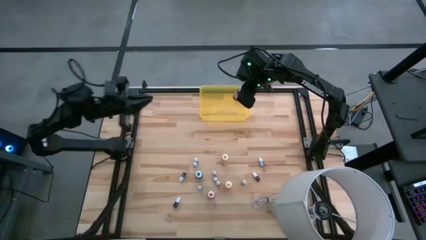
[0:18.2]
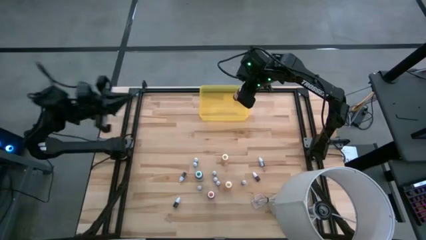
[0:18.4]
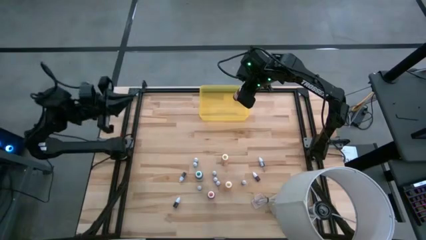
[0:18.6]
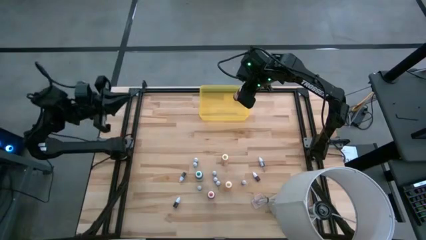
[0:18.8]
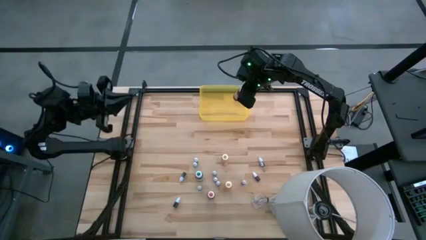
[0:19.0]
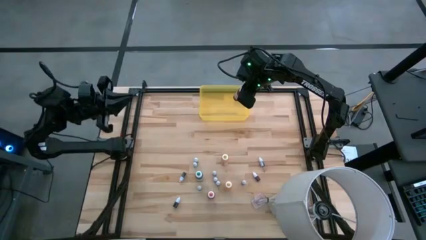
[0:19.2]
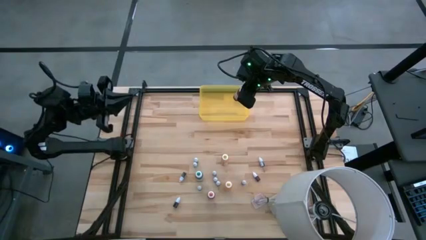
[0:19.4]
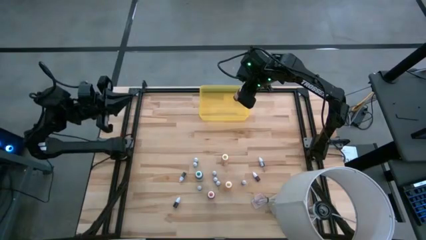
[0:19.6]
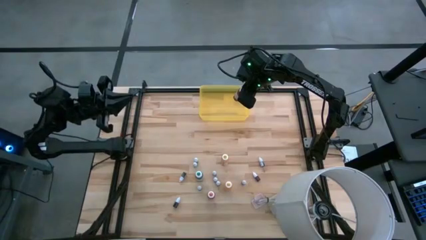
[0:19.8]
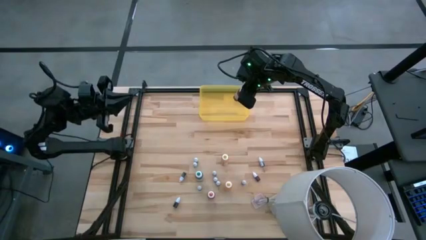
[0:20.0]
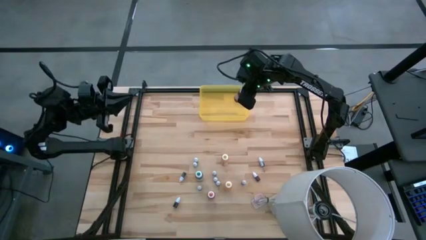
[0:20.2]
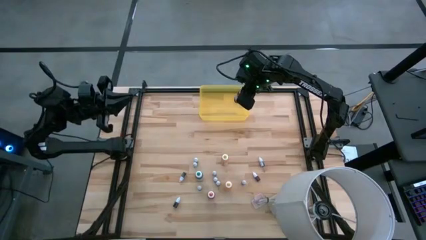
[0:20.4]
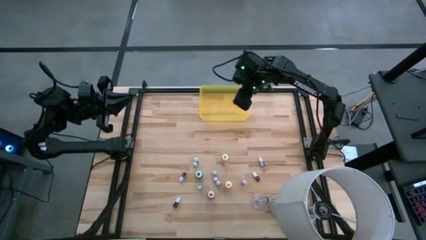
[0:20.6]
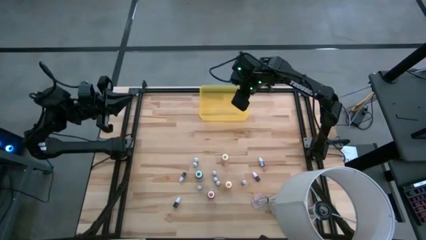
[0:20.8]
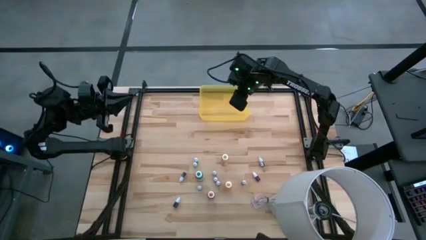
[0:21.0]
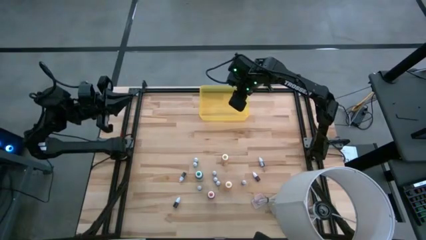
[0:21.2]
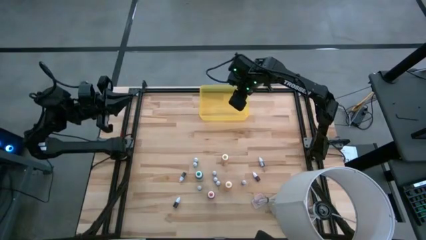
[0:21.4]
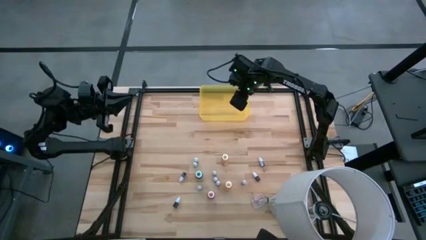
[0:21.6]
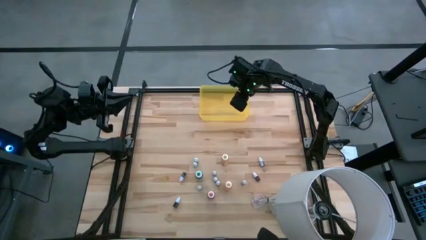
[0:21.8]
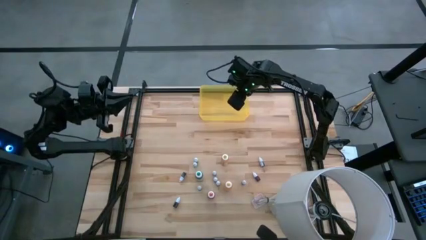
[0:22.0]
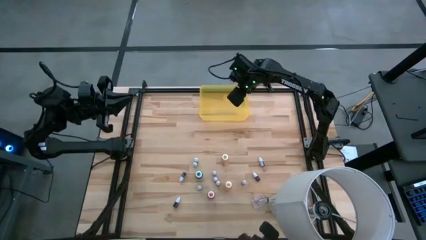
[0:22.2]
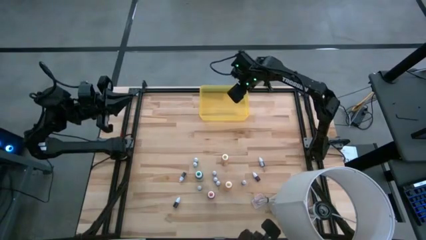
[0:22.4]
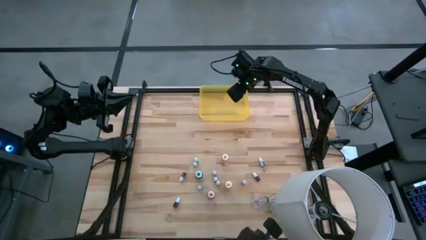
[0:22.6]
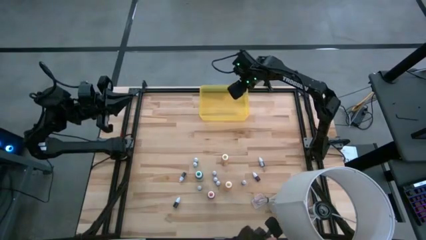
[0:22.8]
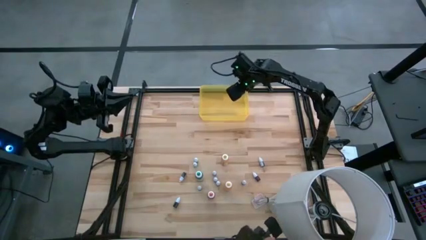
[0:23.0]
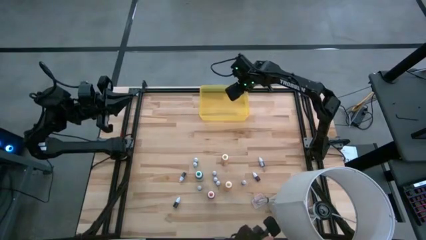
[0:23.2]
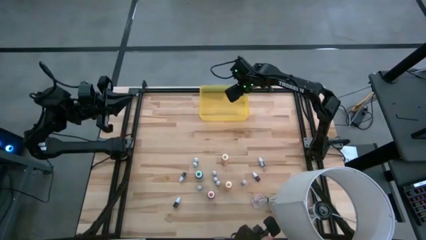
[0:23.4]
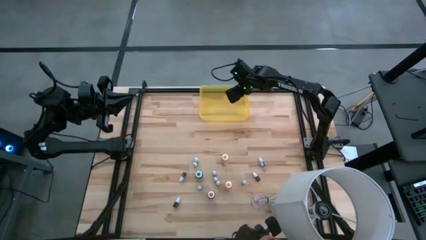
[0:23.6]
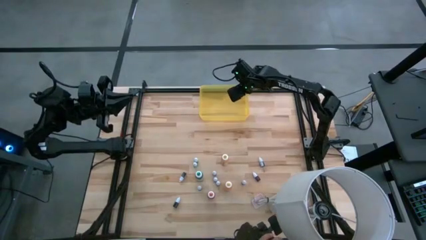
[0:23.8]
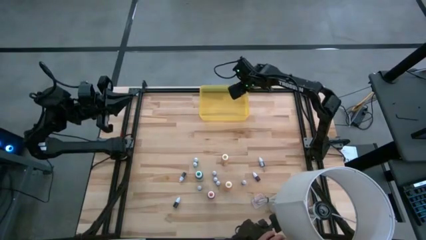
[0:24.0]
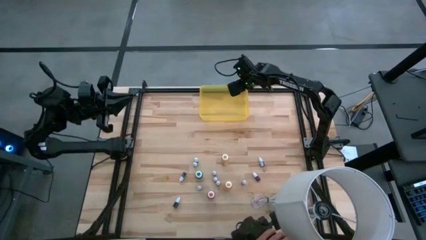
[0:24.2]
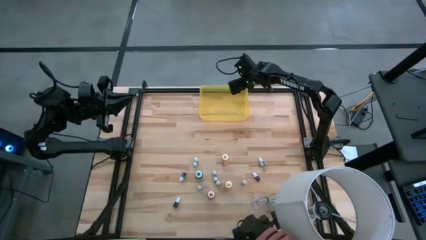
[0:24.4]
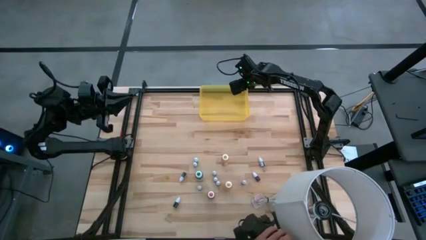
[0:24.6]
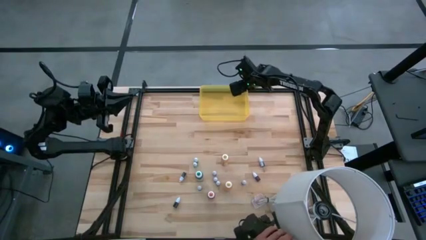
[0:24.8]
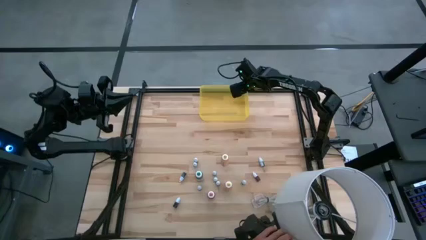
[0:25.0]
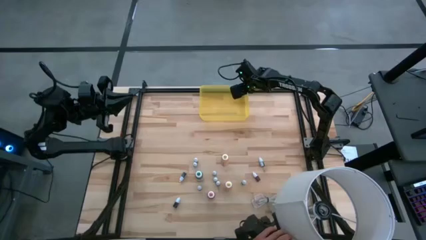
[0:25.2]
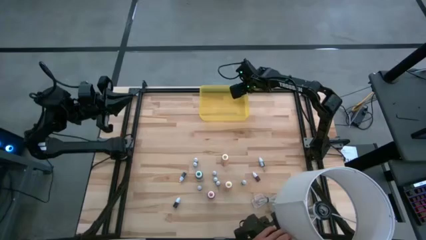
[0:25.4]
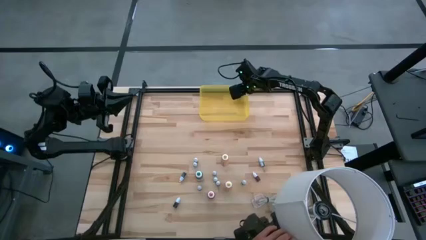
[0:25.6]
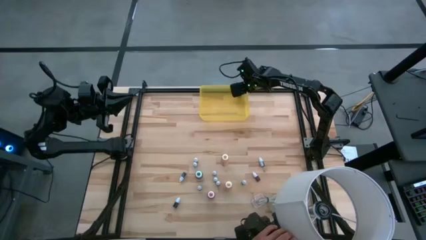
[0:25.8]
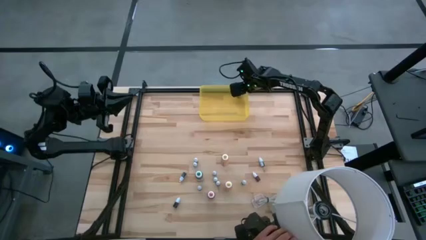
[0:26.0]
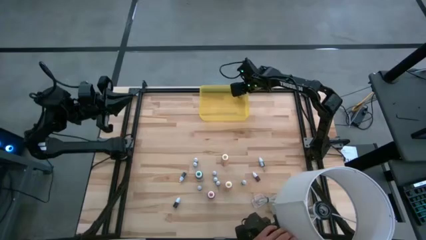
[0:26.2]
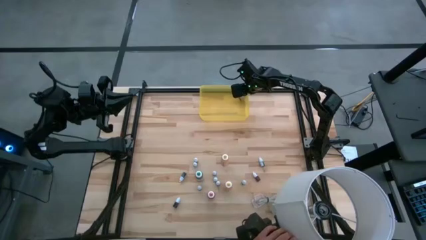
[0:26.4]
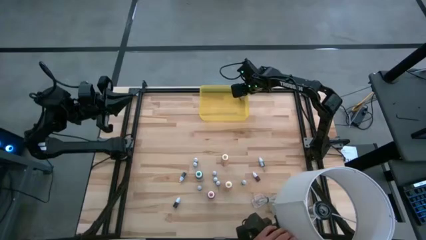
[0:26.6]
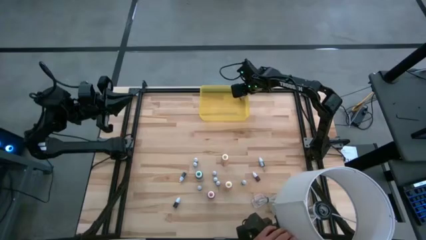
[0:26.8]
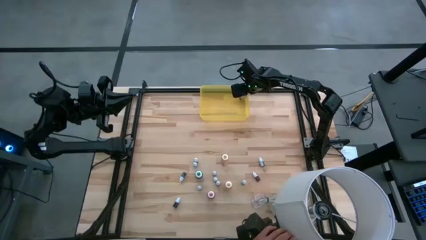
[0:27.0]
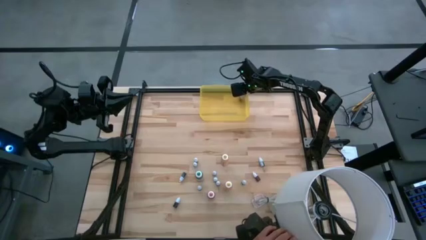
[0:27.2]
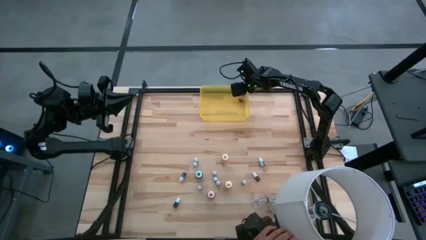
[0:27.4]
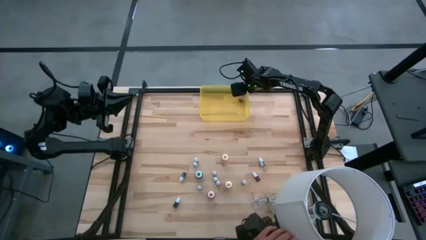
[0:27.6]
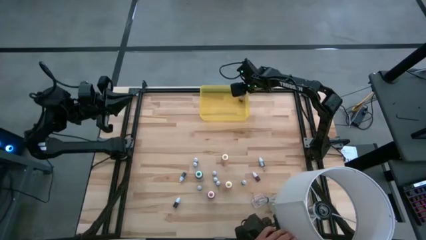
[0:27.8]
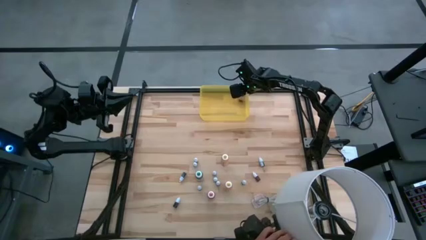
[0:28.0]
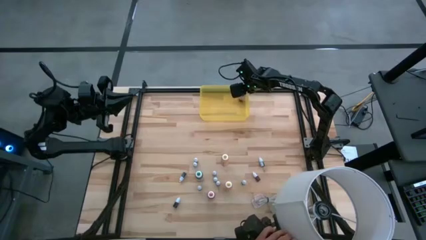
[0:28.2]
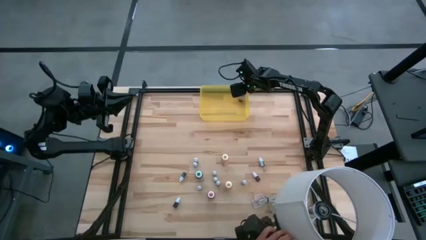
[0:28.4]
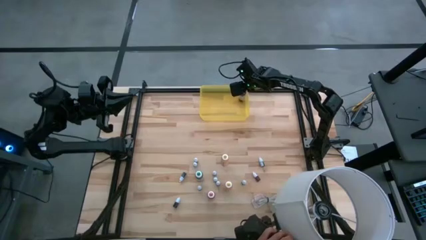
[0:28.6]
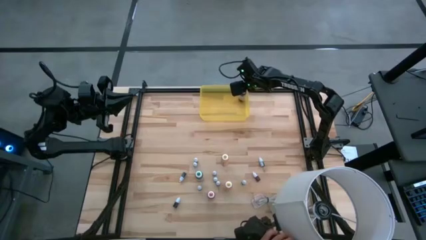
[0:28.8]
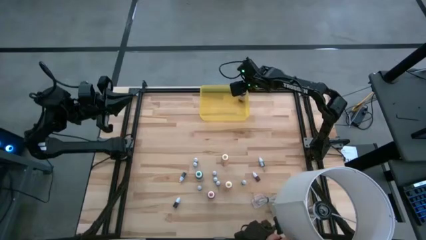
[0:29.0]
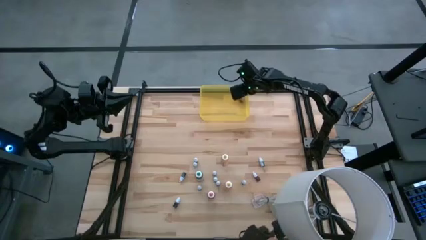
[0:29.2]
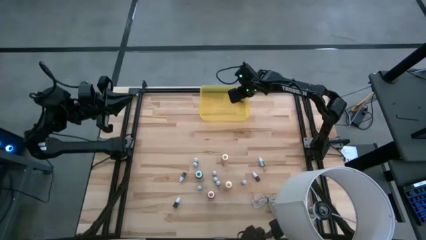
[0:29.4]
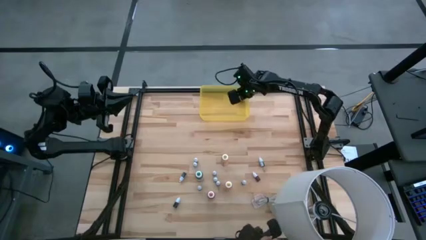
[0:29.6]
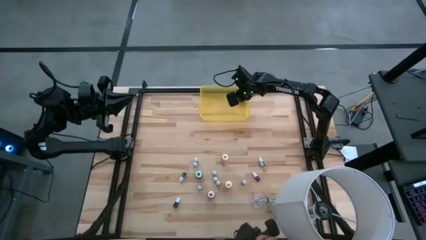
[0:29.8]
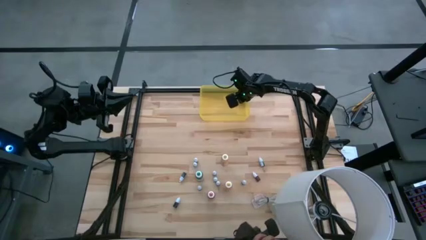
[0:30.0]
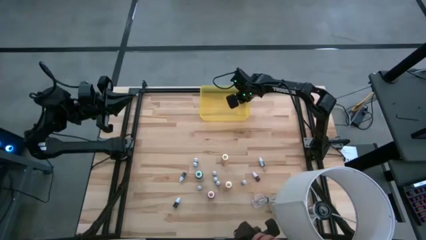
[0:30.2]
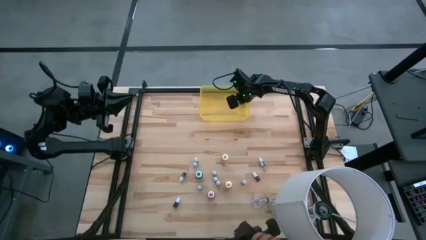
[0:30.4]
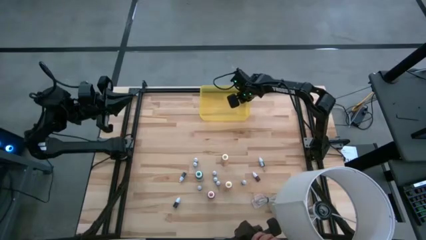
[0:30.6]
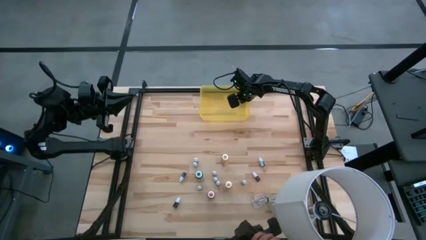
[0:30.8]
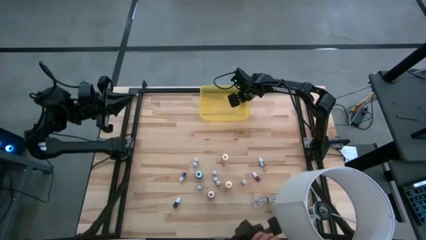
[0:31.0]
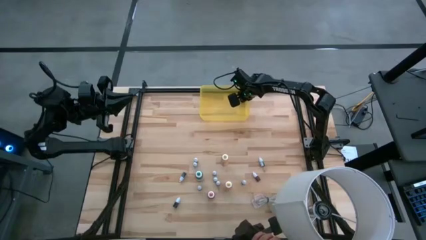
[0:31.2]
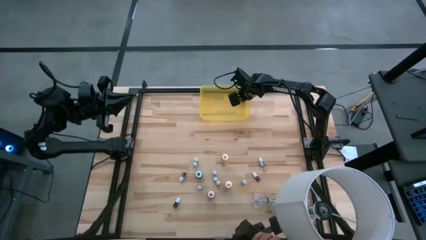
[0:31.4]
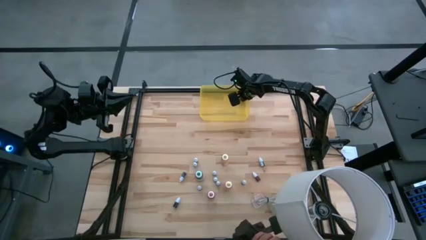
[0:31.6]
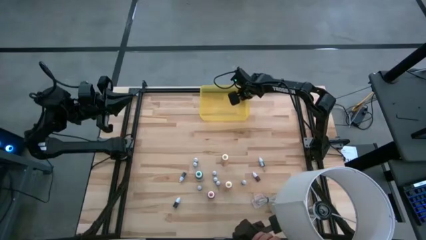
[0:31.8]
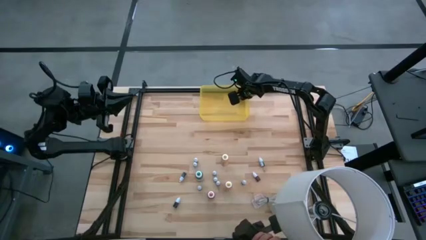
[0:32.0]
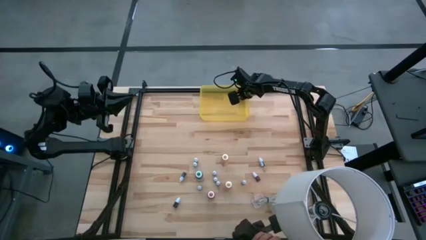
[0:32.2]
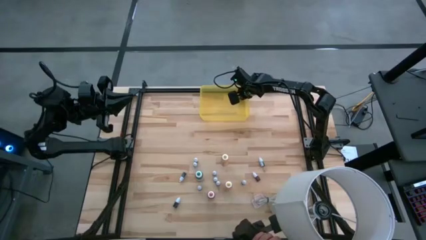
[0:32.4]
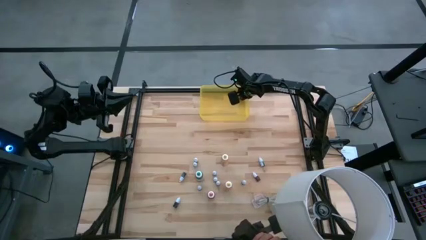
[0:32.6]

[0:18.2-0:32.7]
Task: Pick & Place food coloring
Put the large red food coloring bottle into the yellow bin
